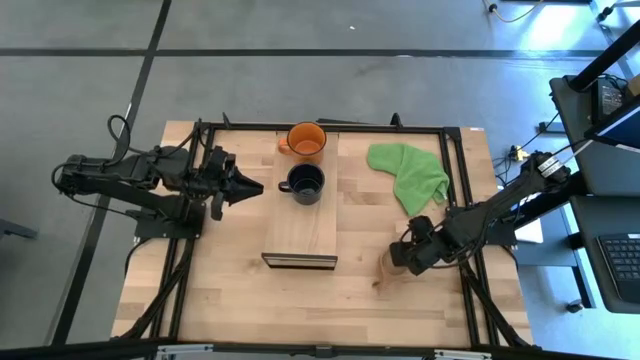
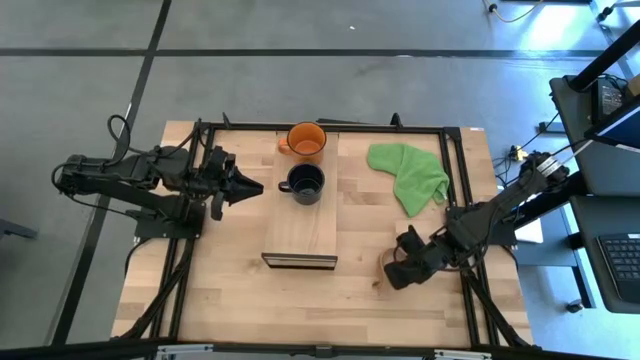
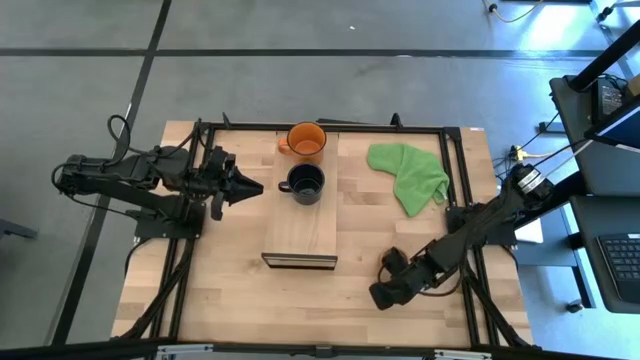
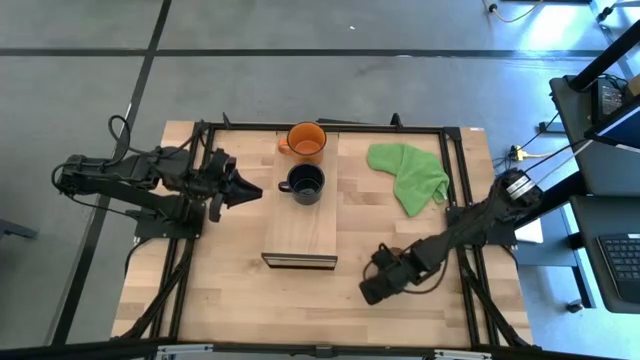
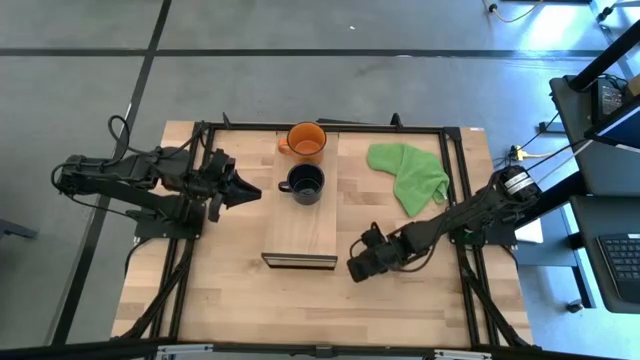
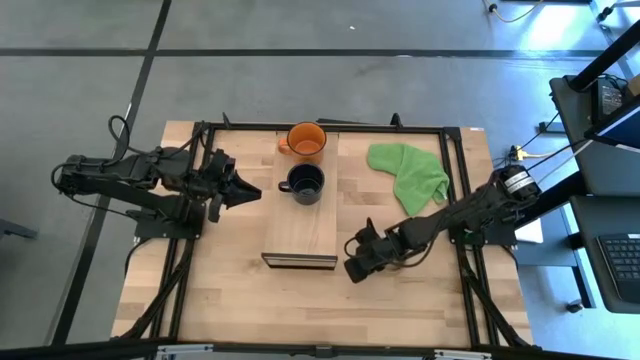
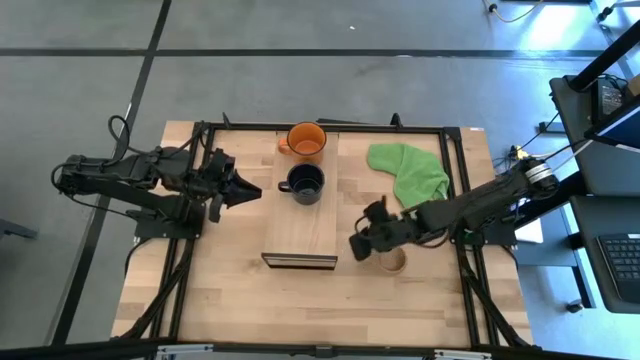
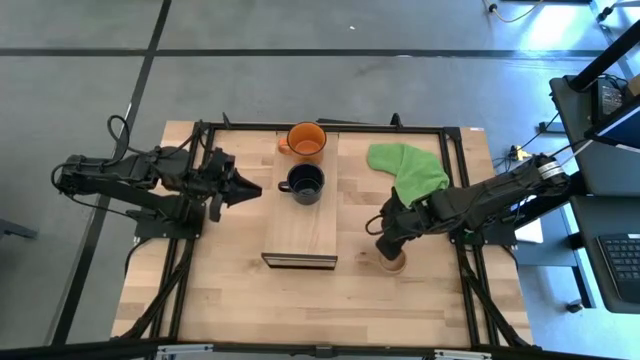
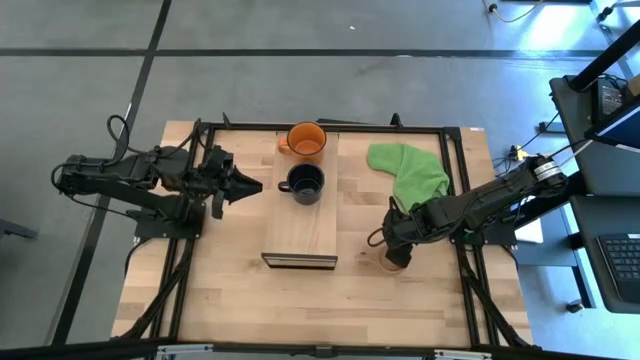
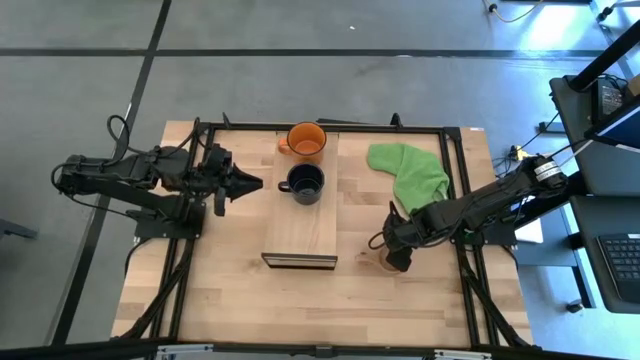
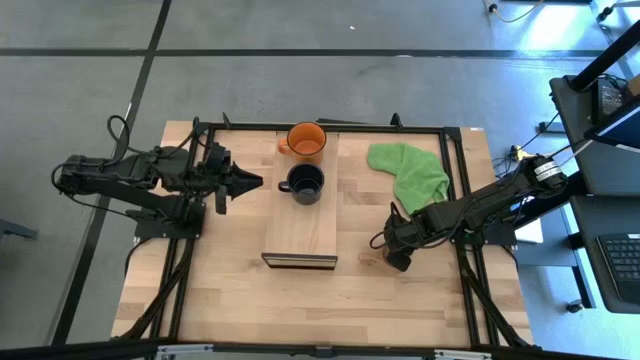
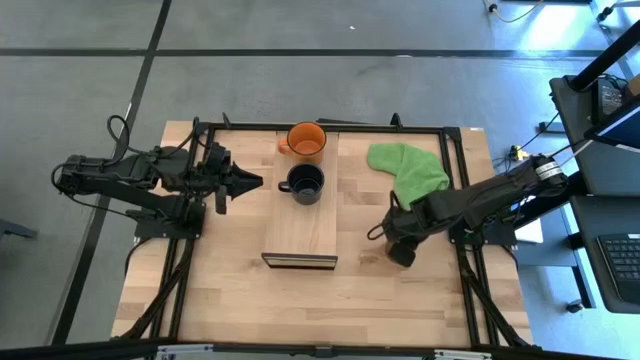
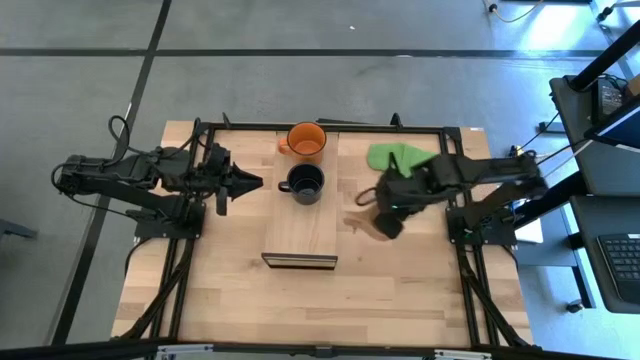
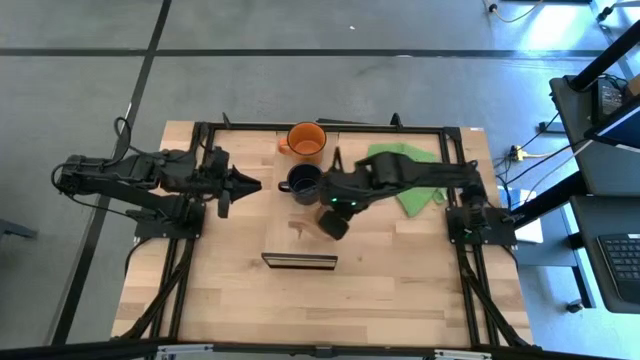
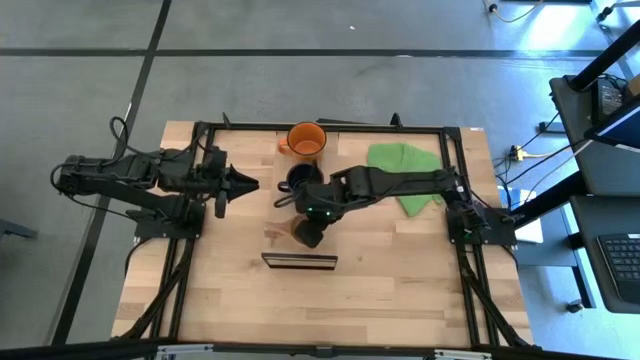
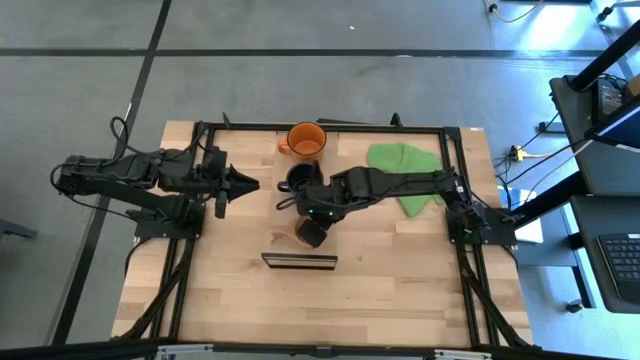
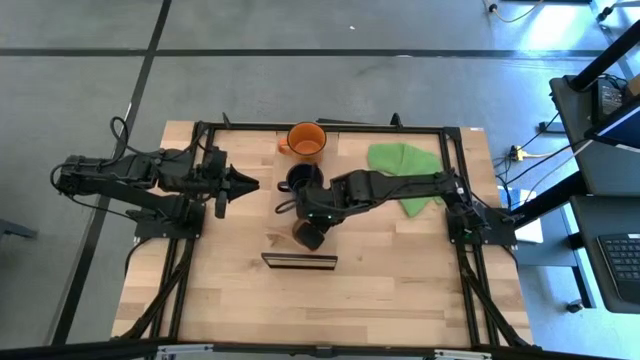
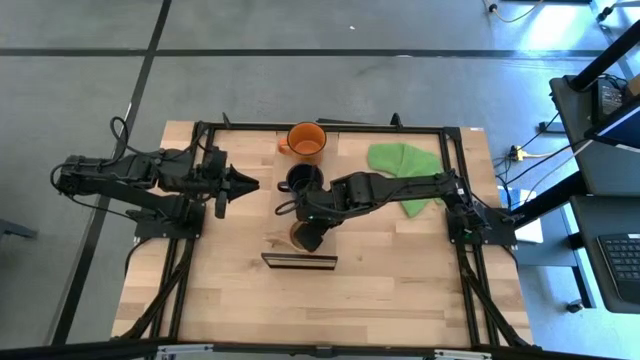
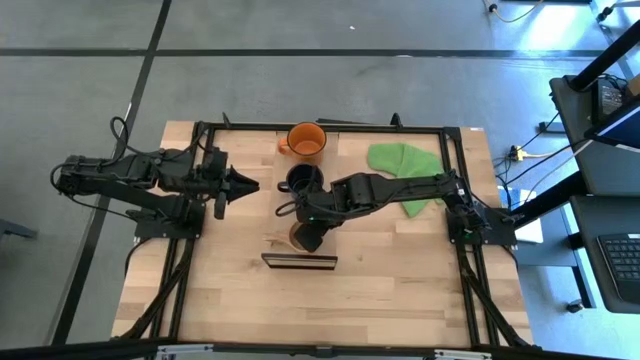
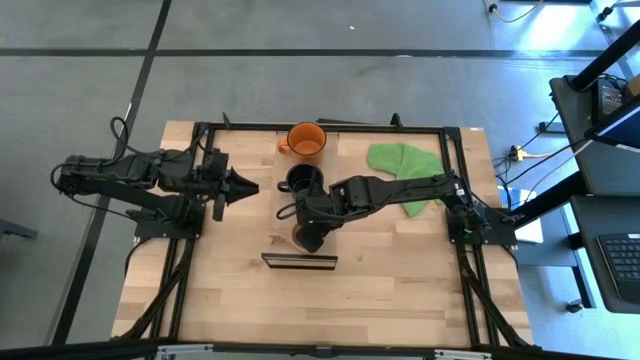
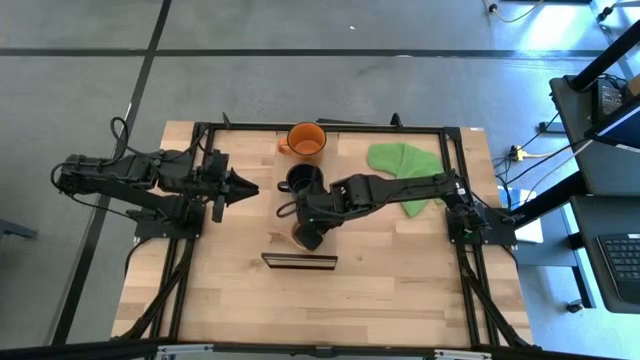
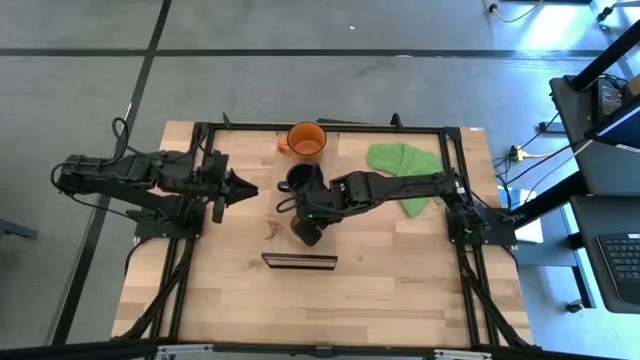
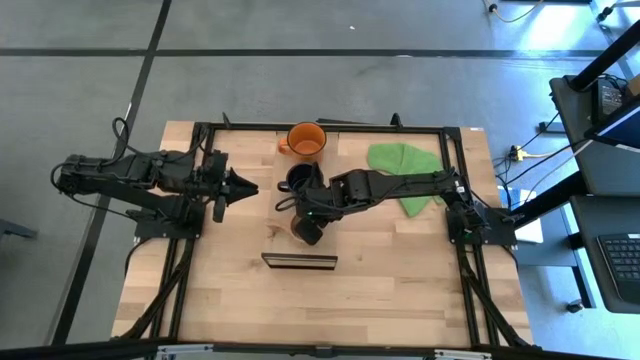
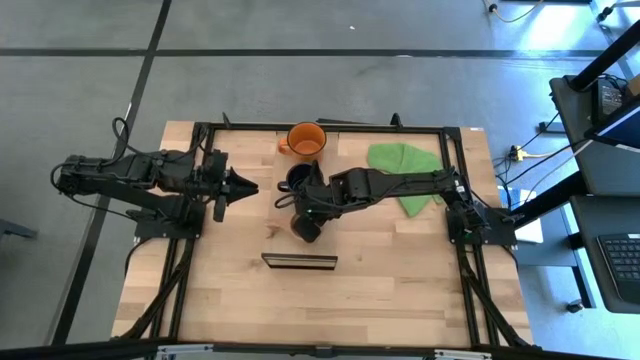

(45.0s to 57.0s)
Task: Stack small to large cups/mugs on shelf
Put the brown mug on the shelf

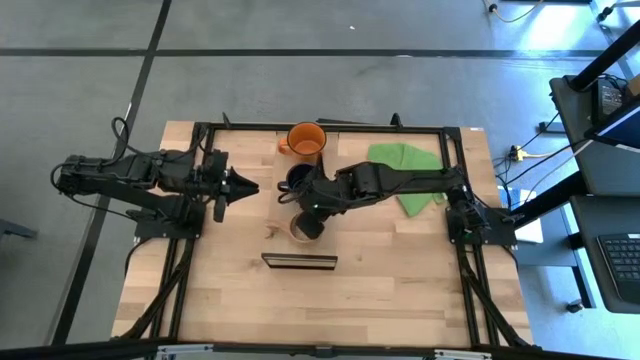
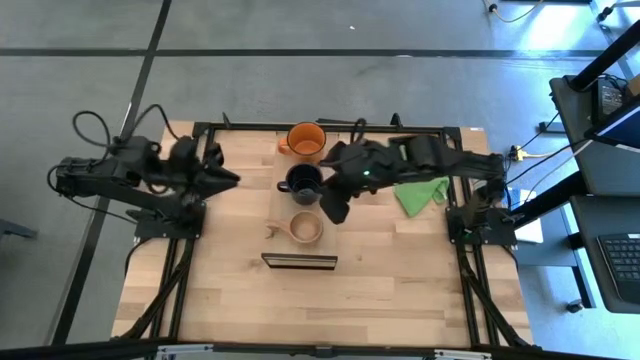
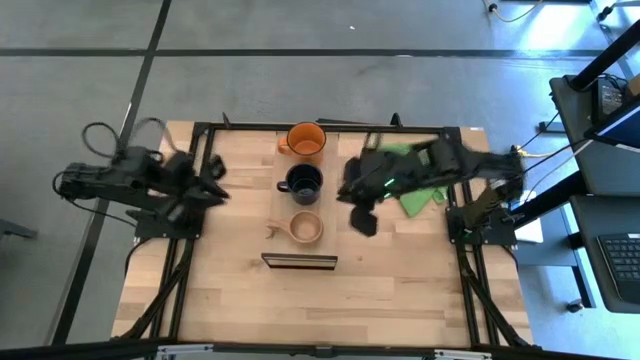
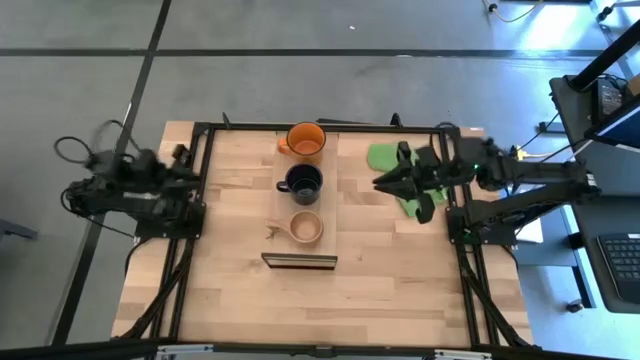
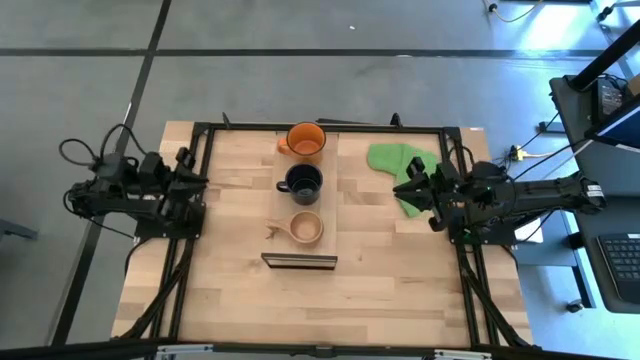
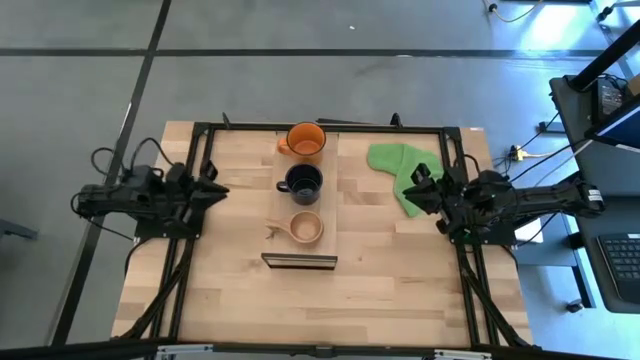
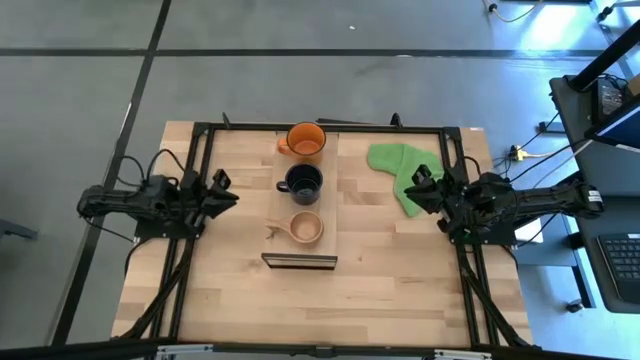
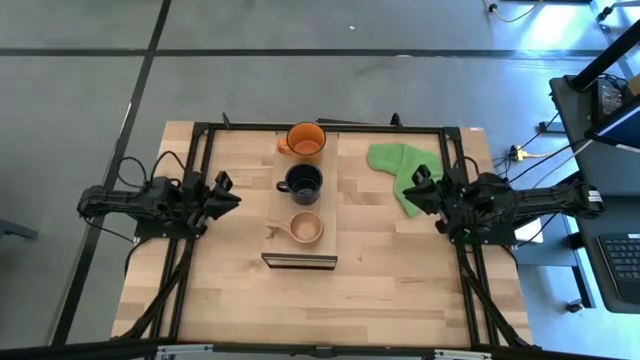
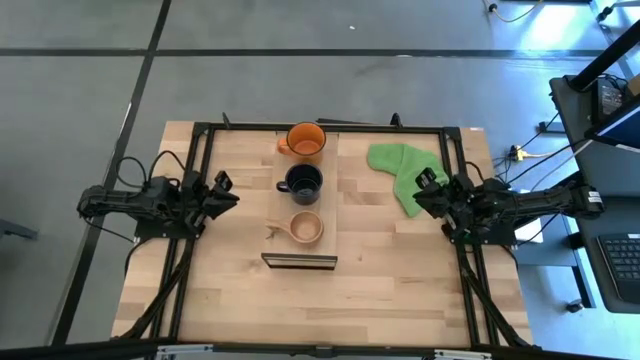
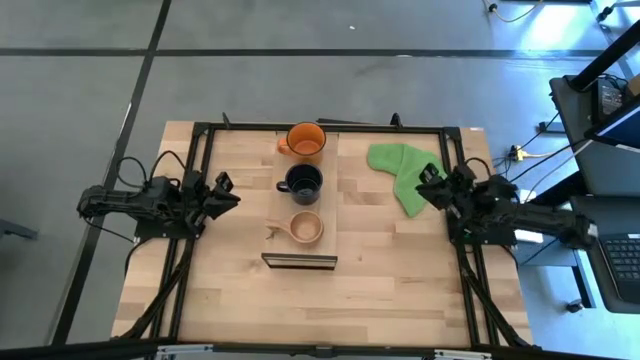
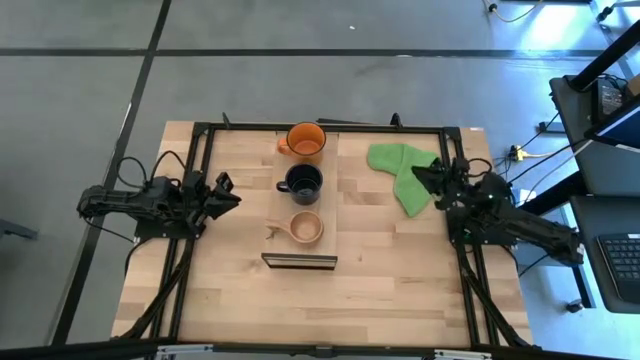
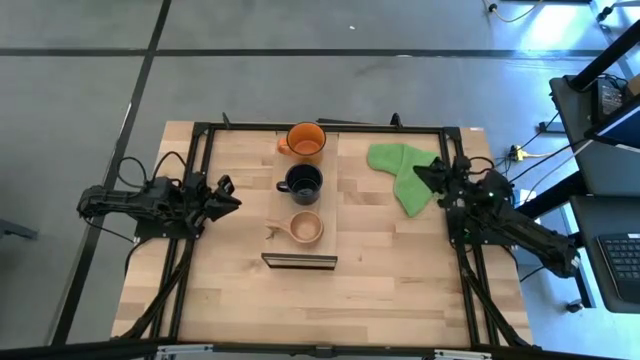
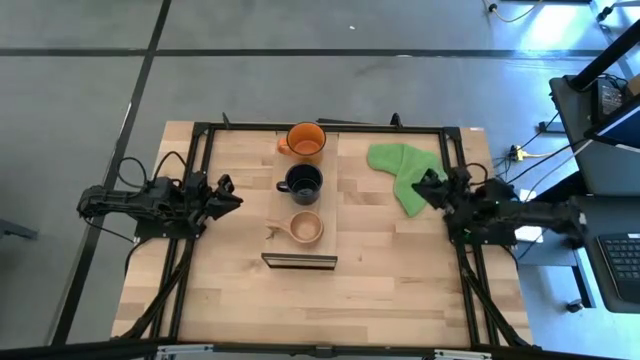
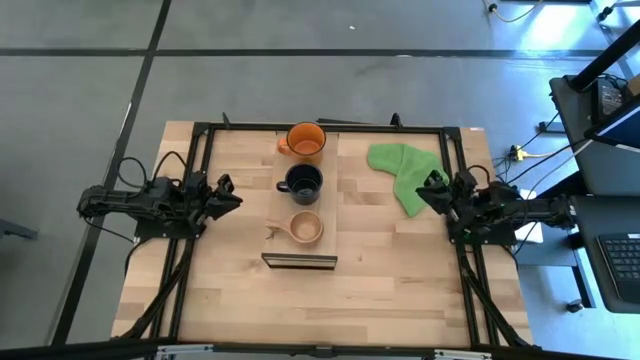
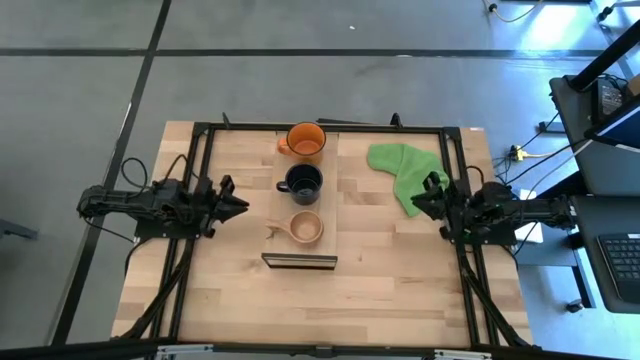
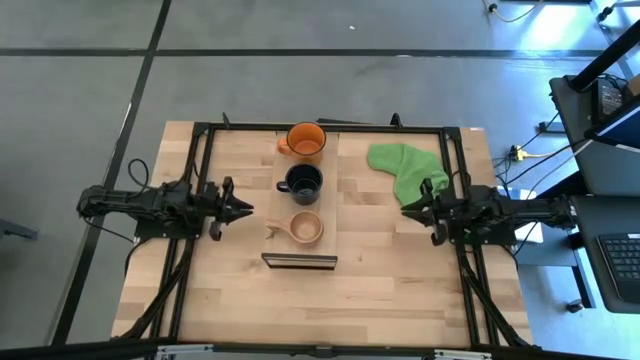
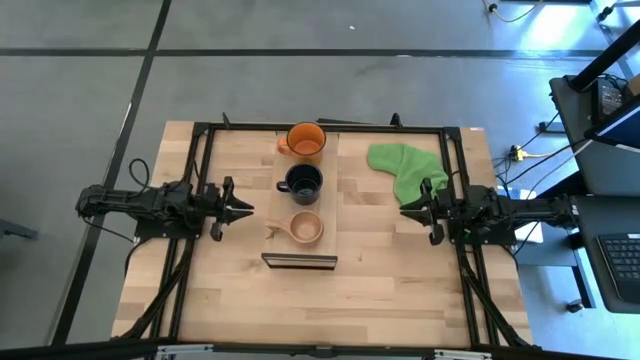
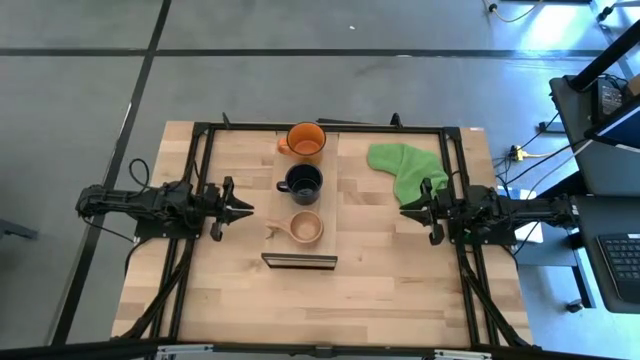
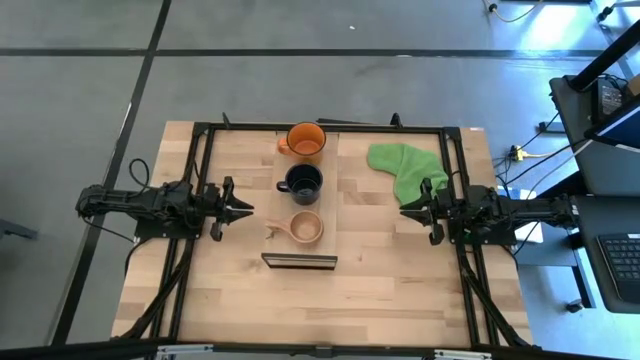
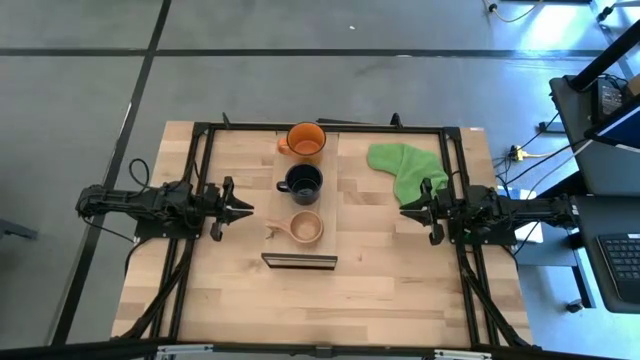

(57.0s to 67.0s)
Return to Home Position
